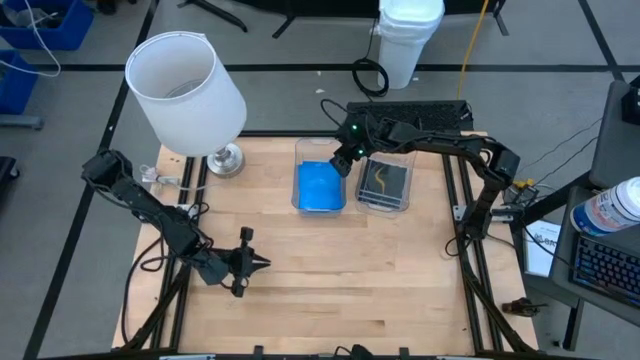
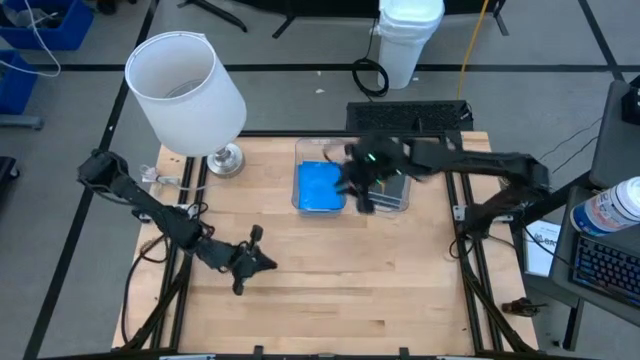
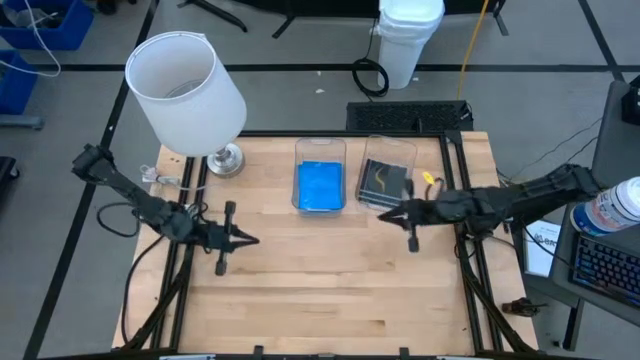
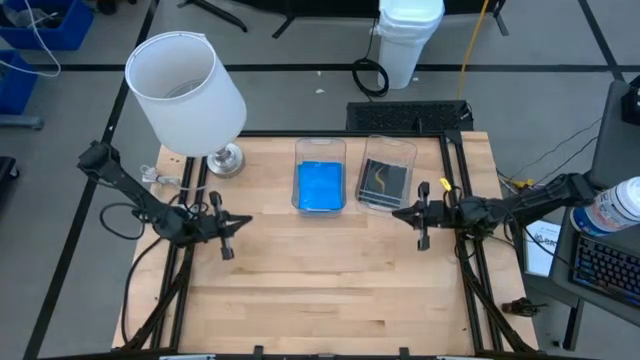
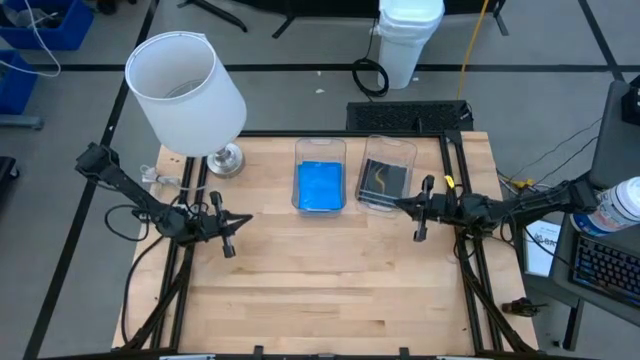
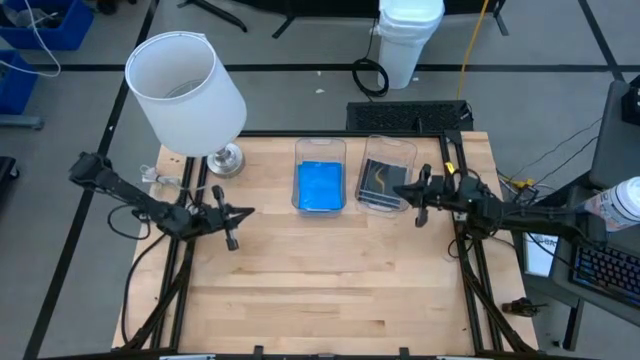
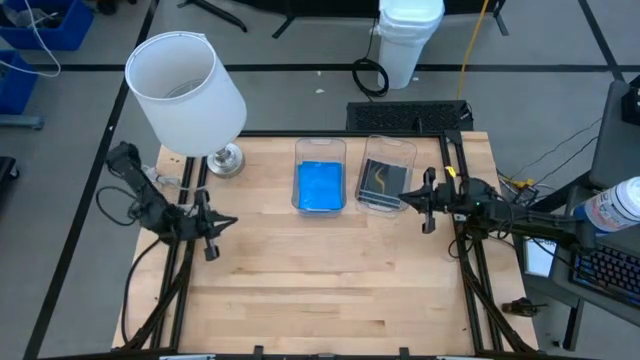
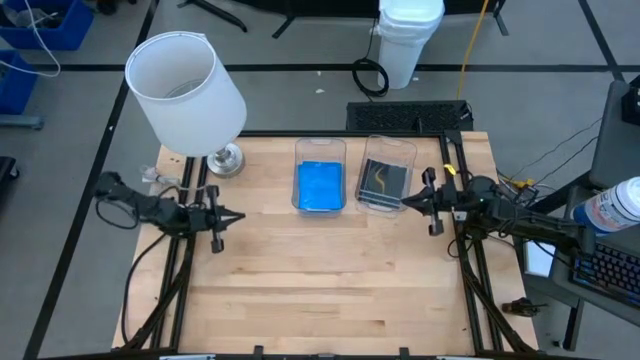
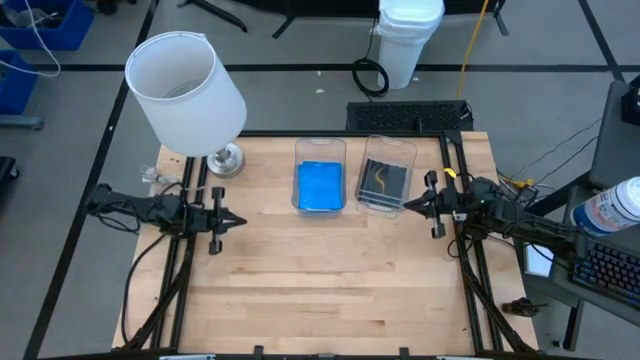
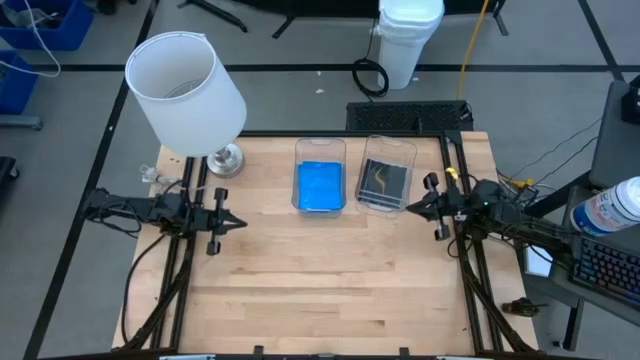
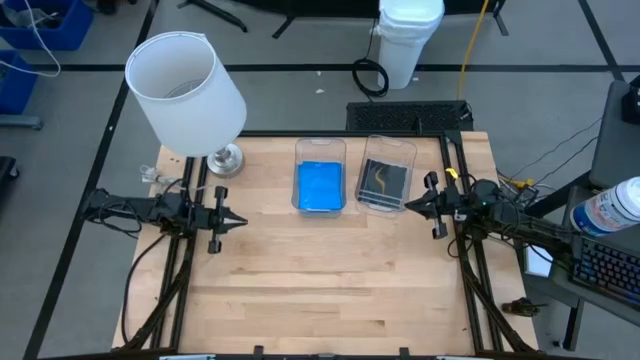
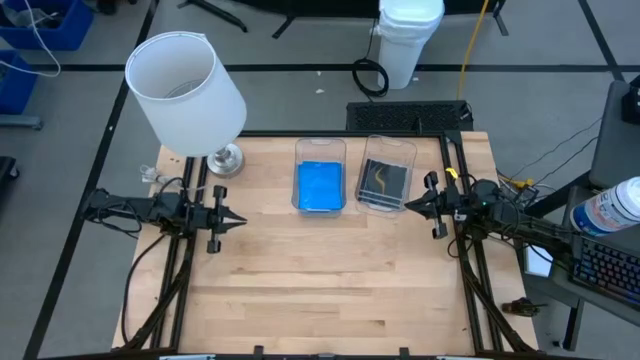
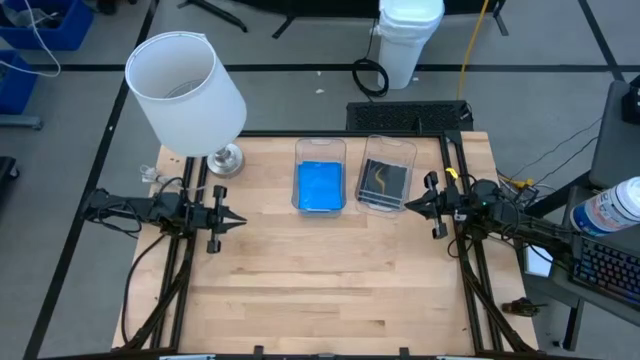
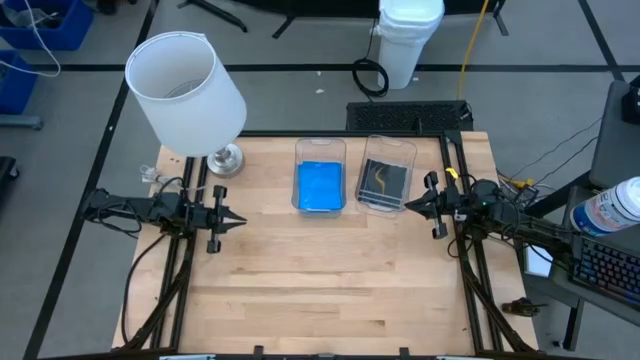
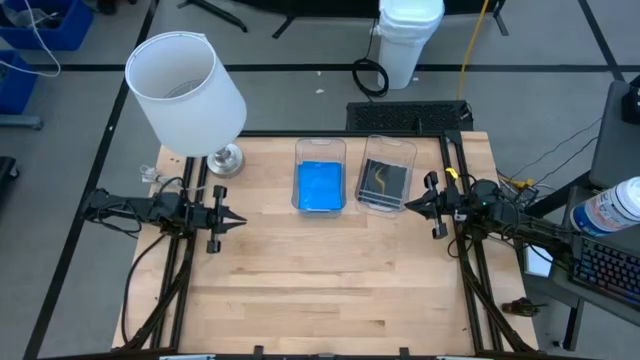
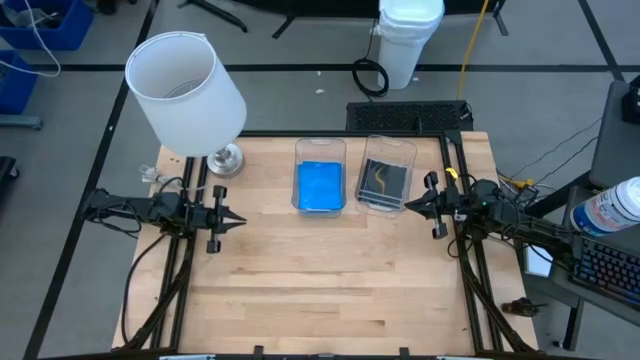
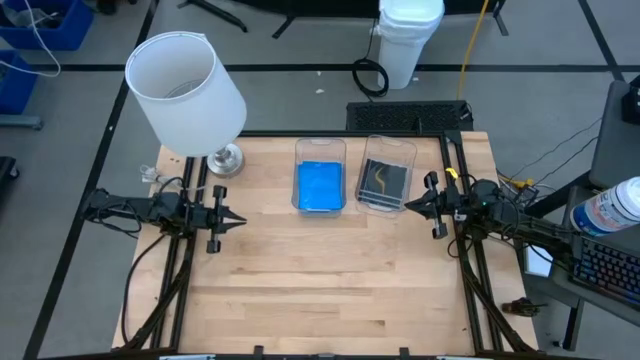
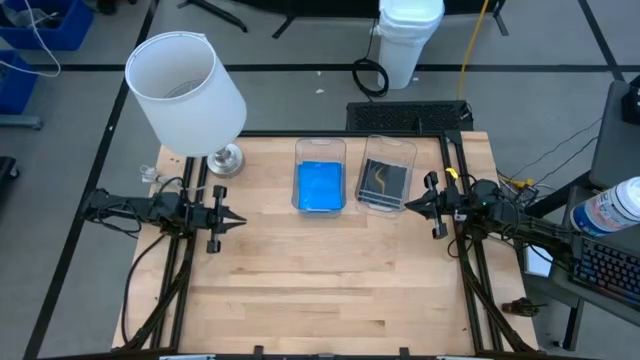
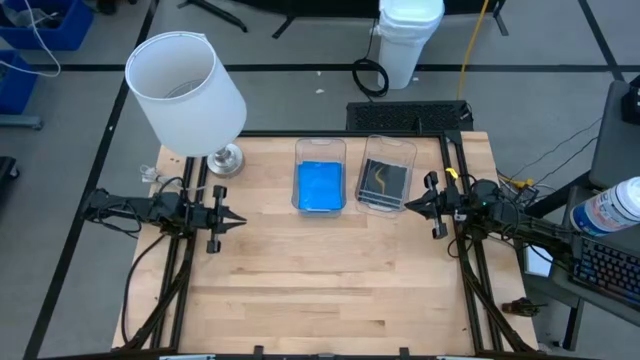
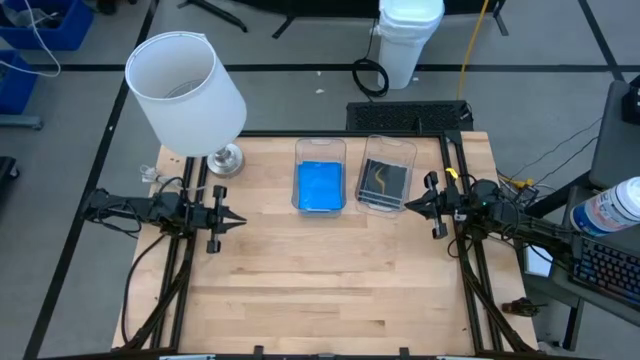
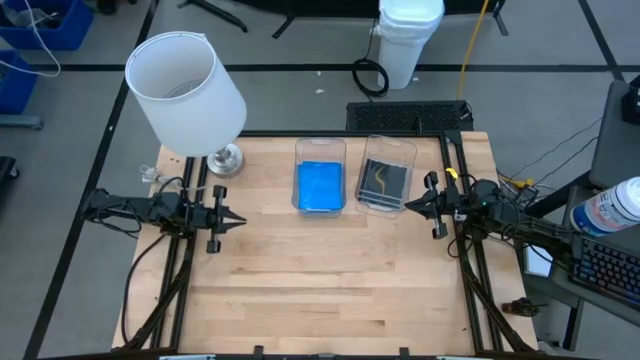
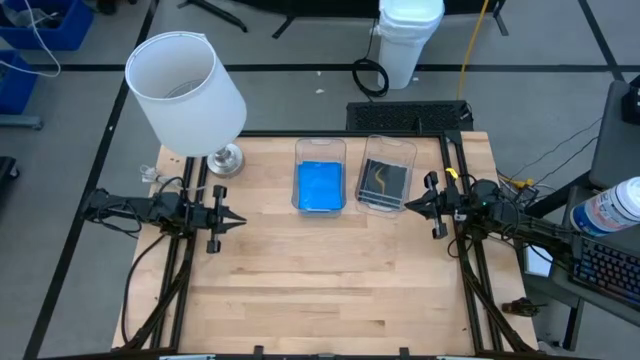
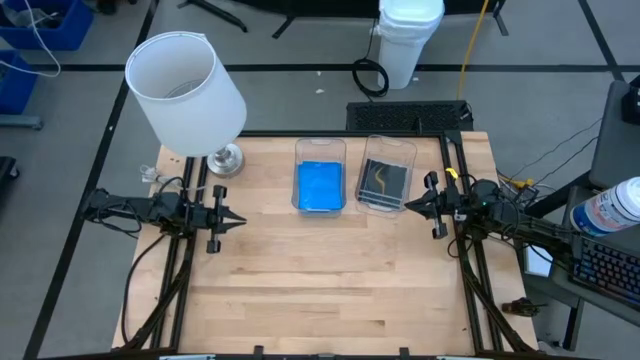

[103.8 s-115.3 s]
Task: Pick & place jewel cases by type
Return to Home Position

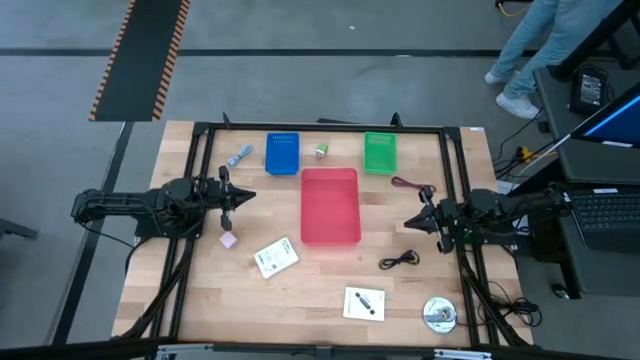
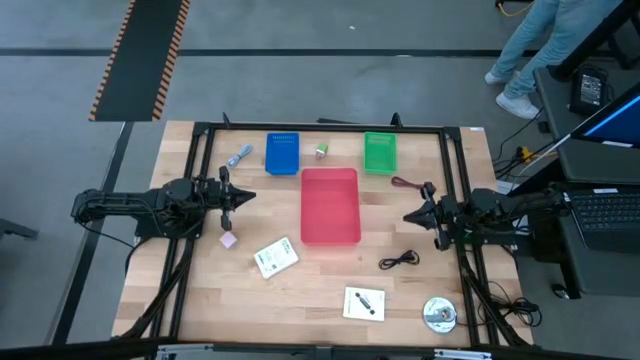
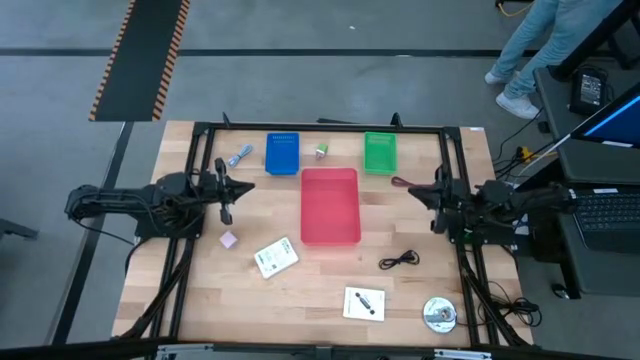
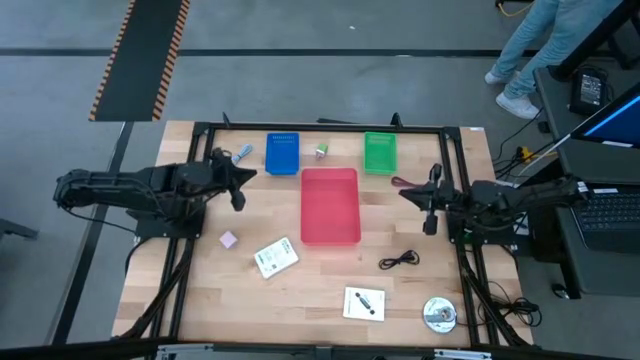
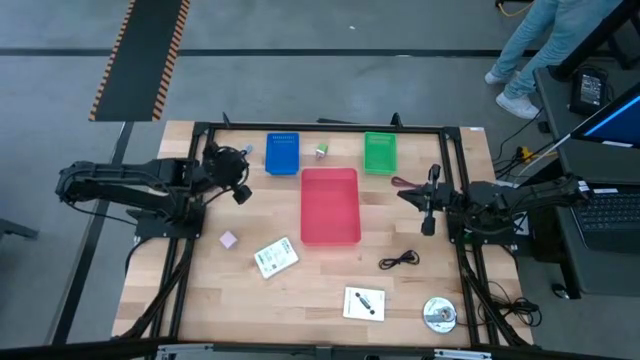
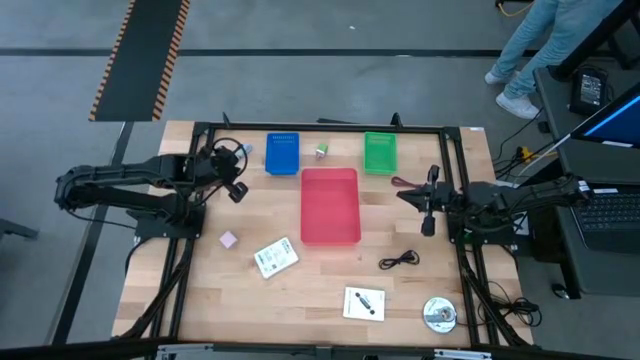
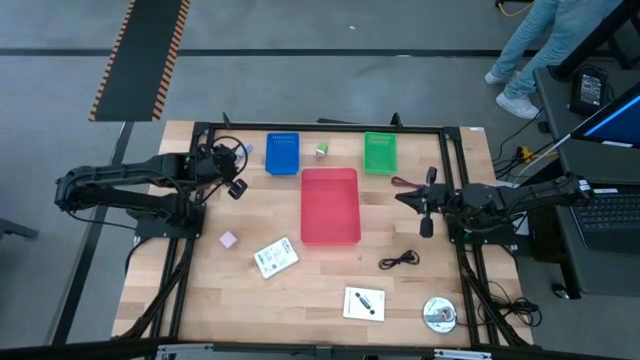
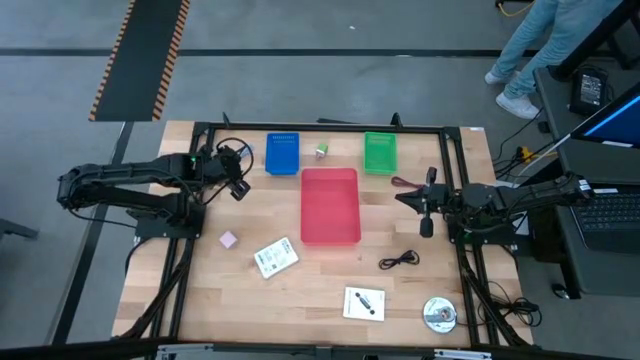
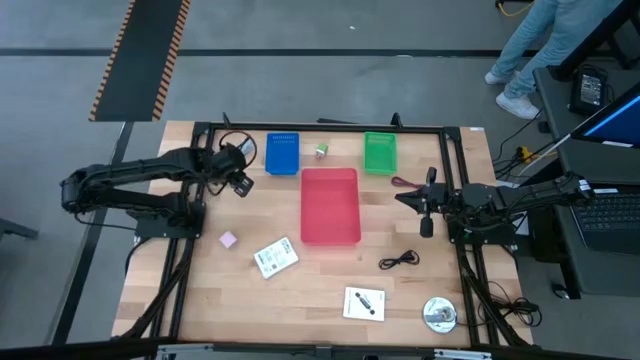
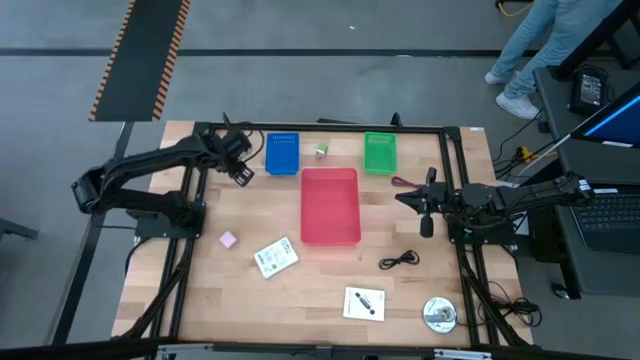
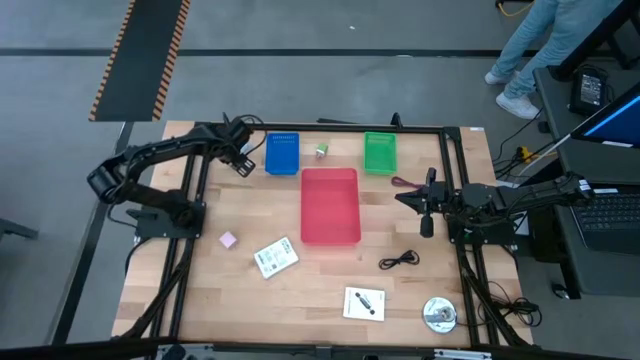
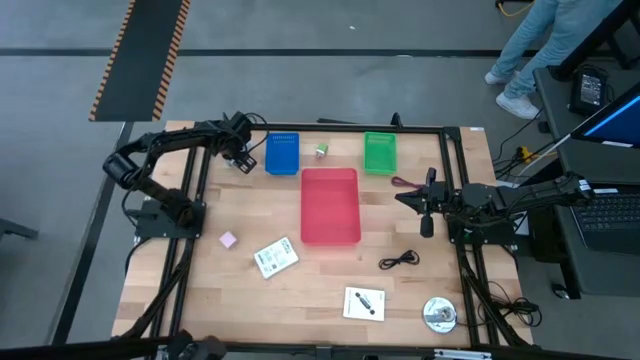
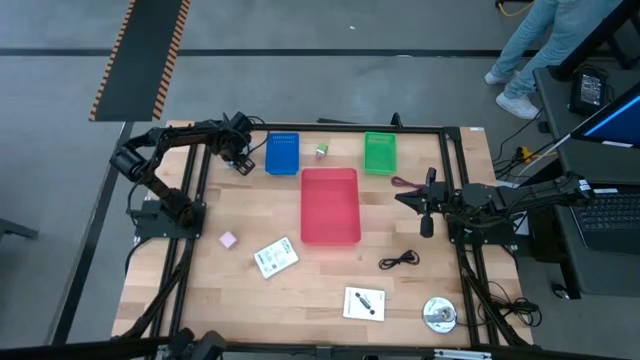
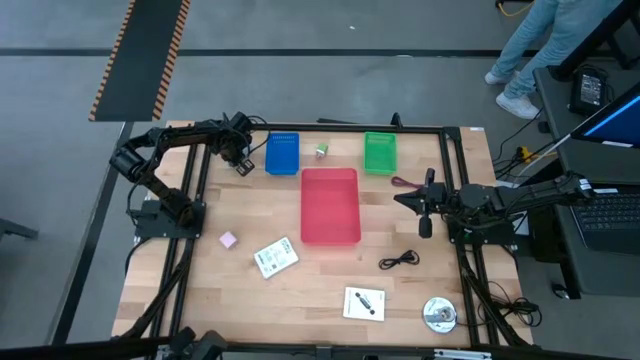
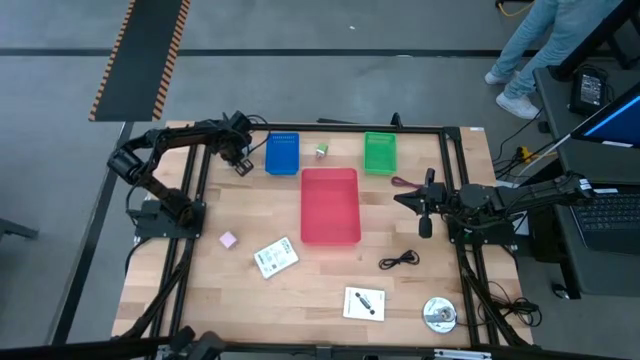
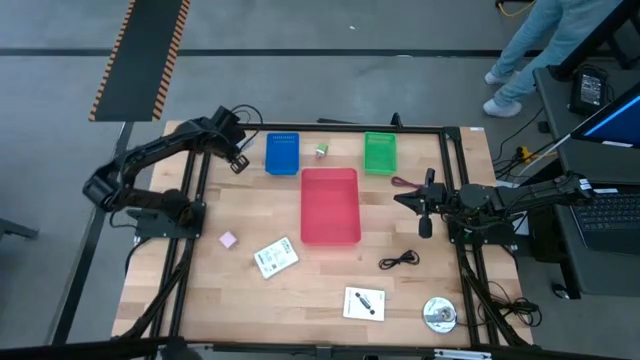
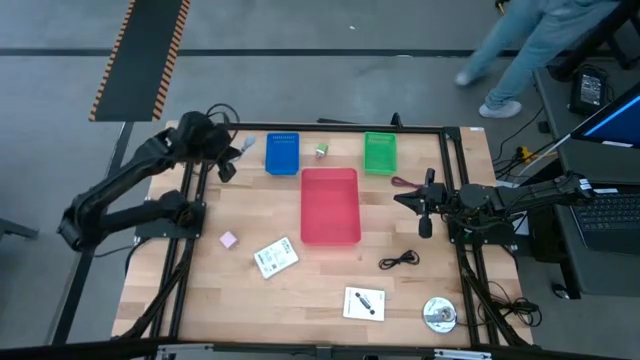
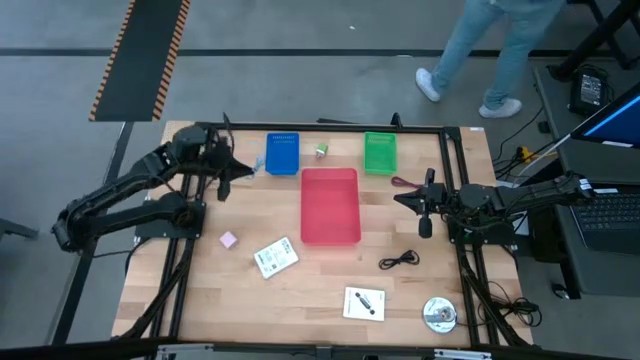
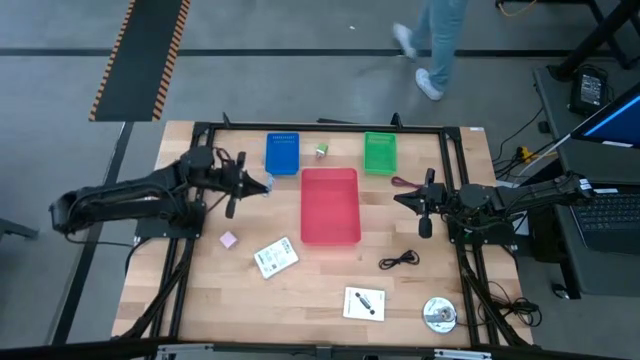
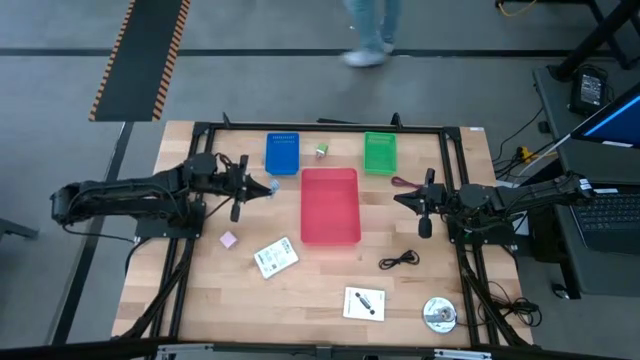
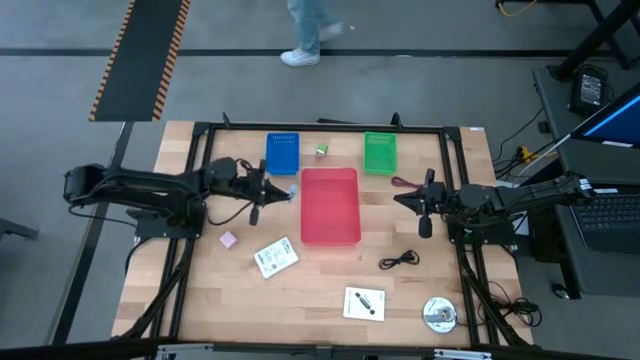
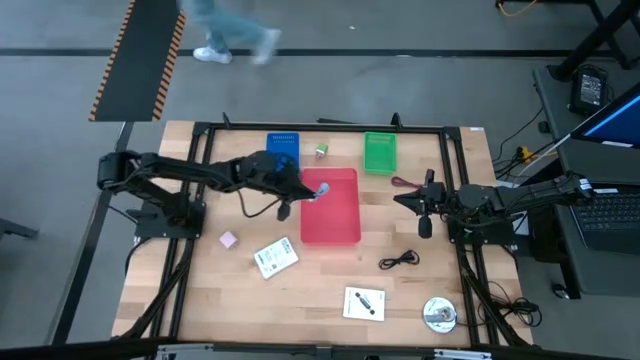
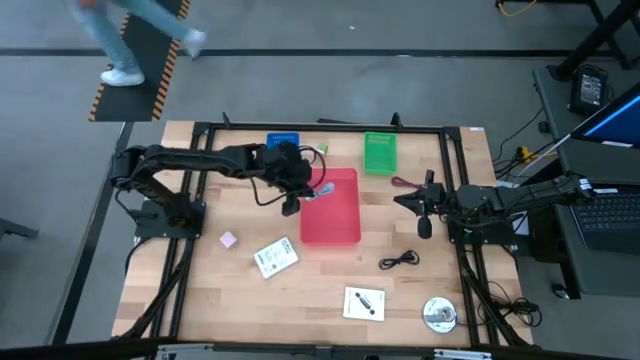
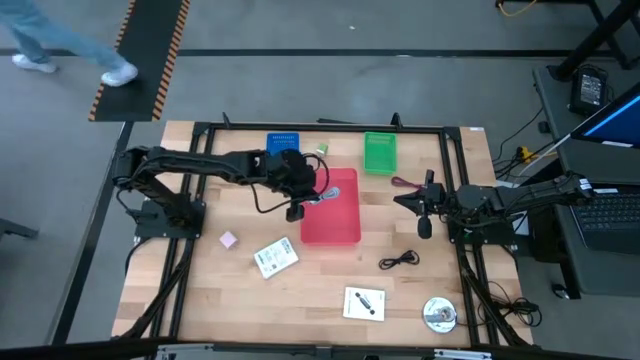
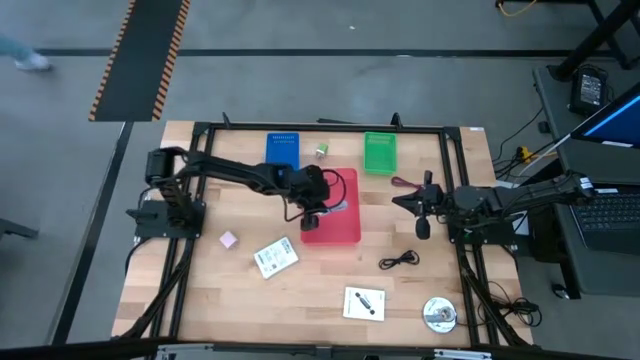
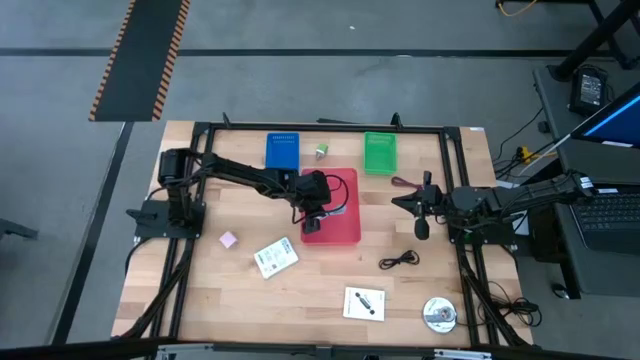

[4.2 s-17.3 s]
Task: Pick and place items into bin
Put the blue charger cable into the red bin
